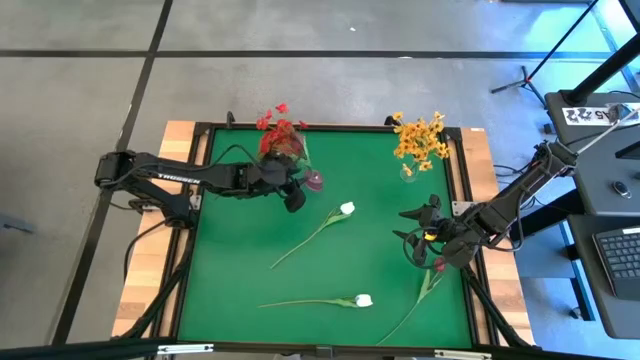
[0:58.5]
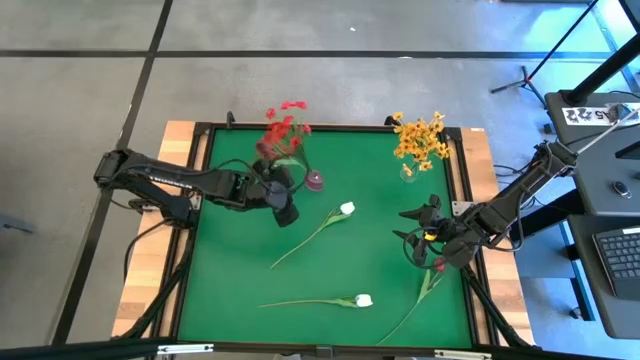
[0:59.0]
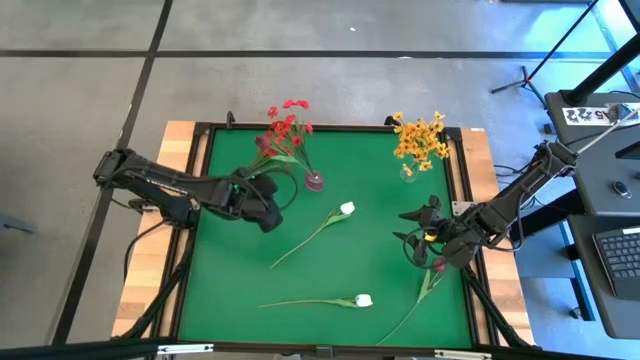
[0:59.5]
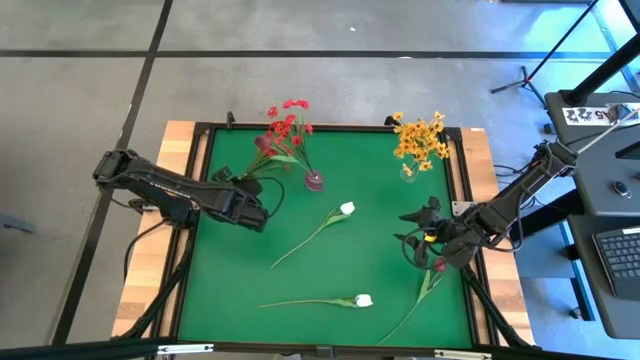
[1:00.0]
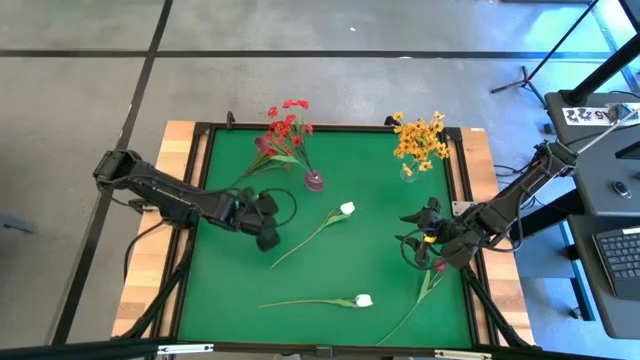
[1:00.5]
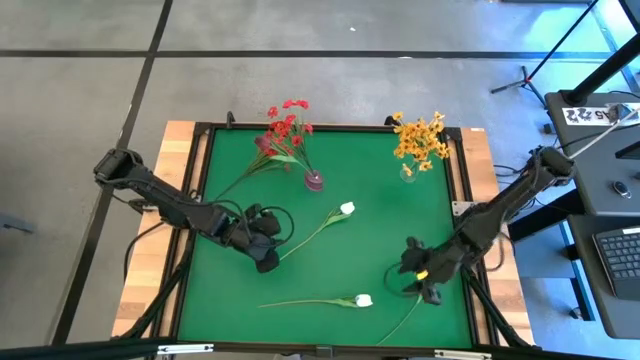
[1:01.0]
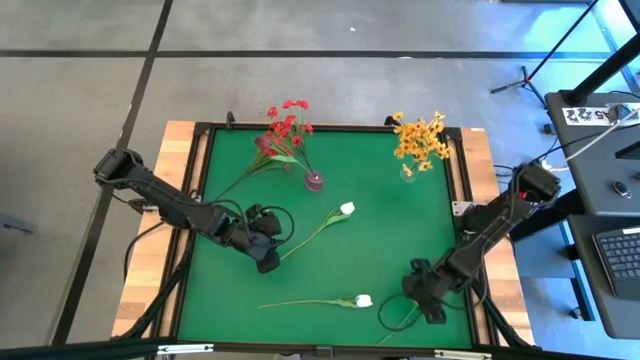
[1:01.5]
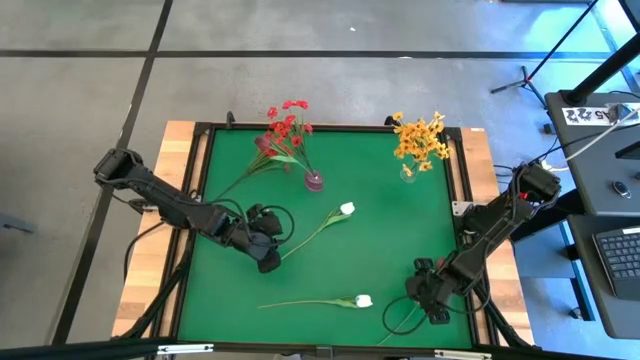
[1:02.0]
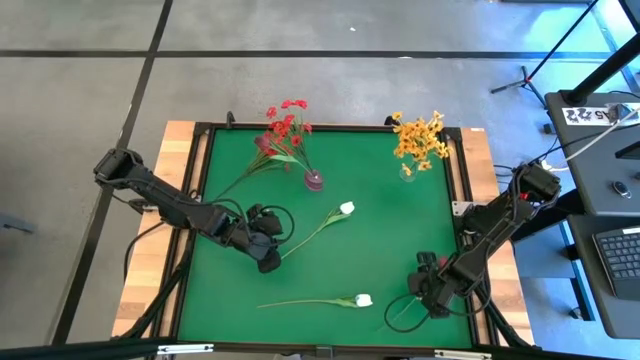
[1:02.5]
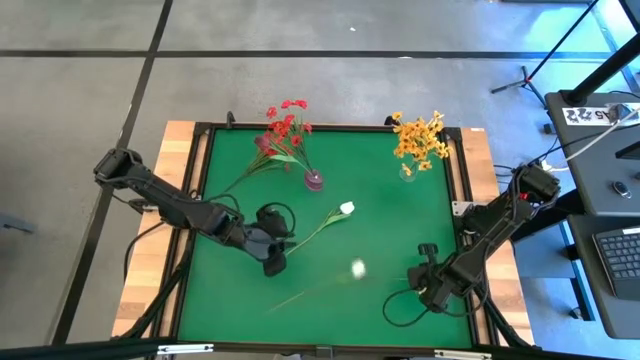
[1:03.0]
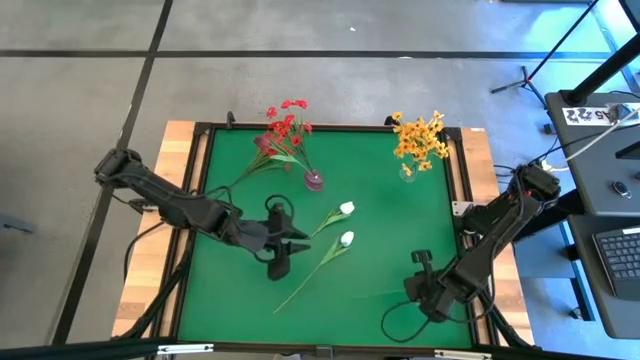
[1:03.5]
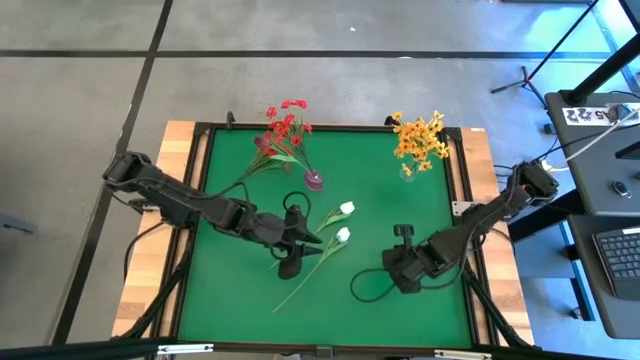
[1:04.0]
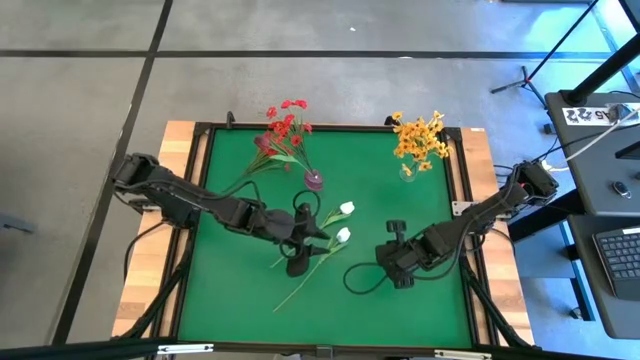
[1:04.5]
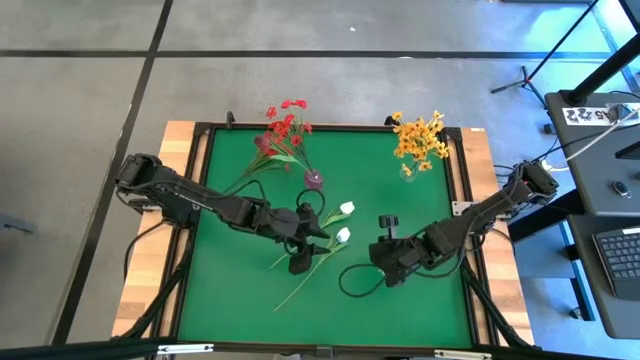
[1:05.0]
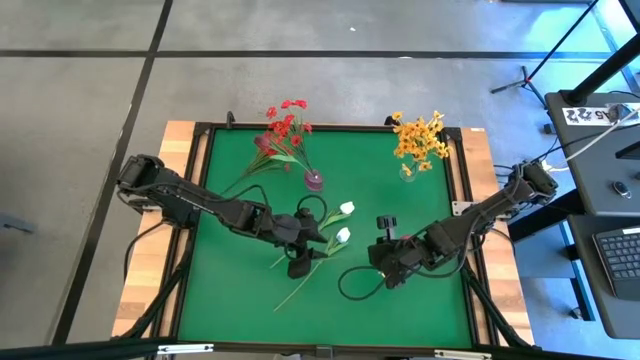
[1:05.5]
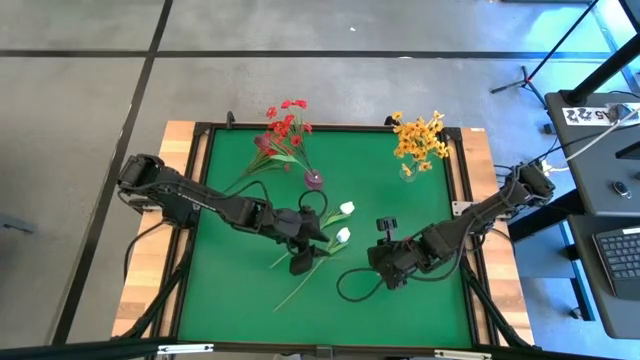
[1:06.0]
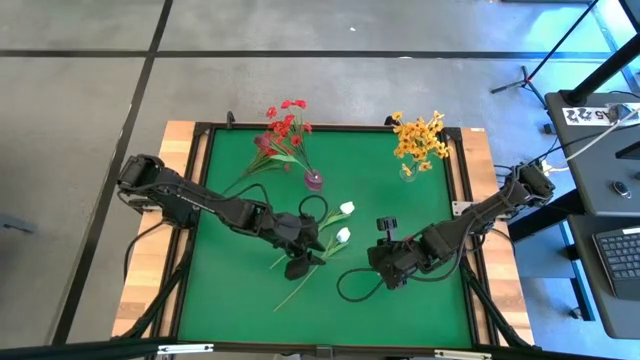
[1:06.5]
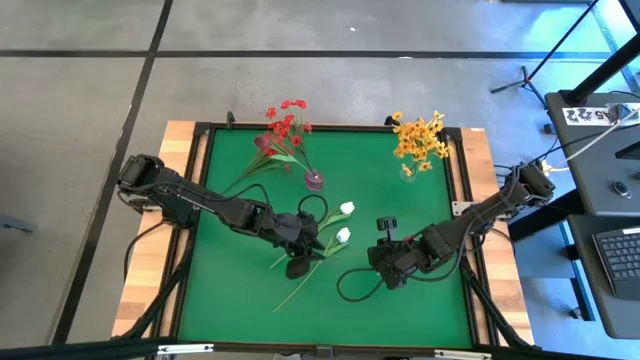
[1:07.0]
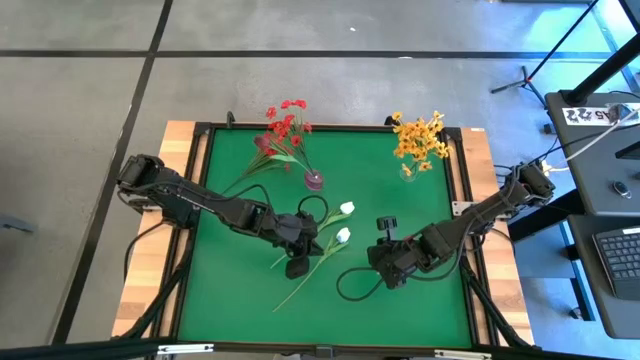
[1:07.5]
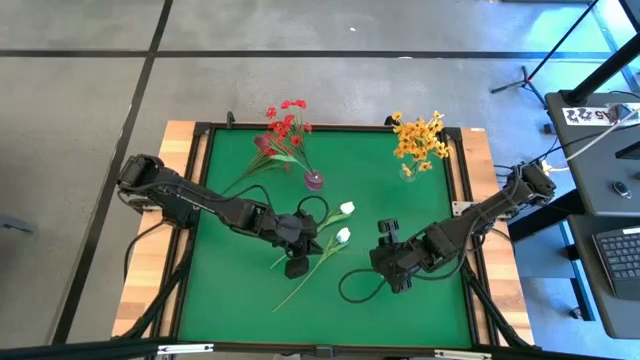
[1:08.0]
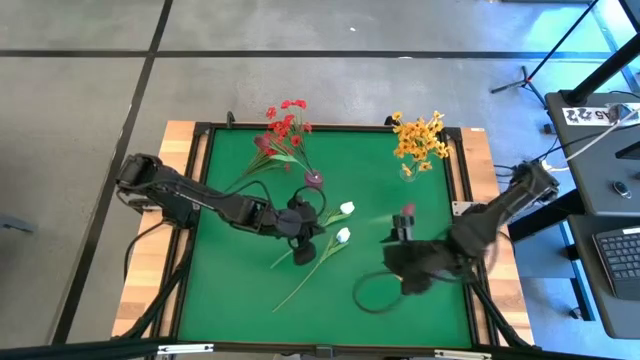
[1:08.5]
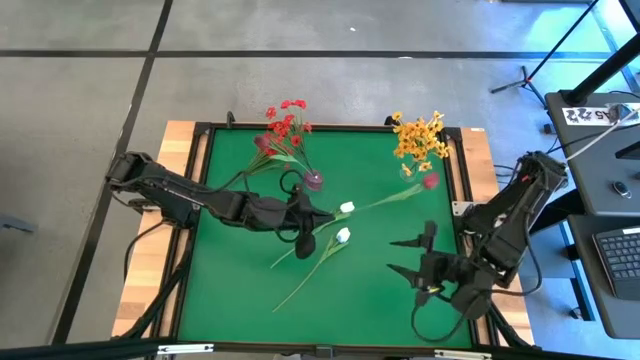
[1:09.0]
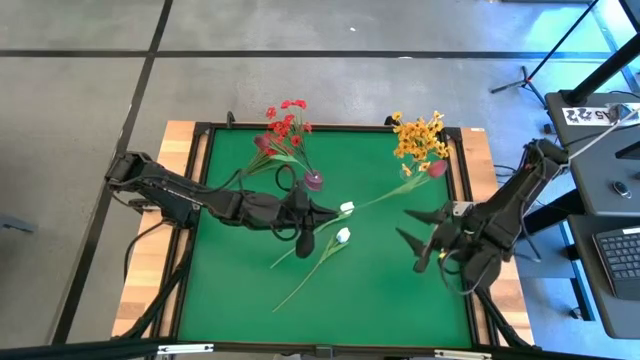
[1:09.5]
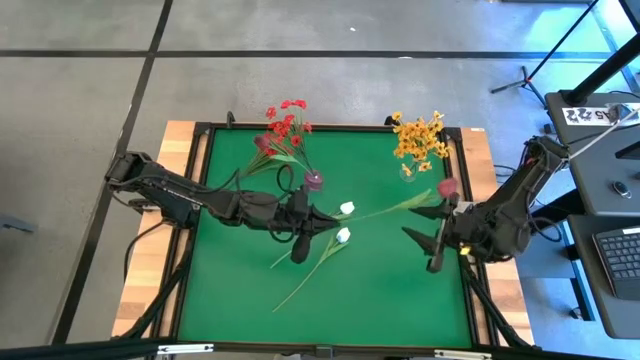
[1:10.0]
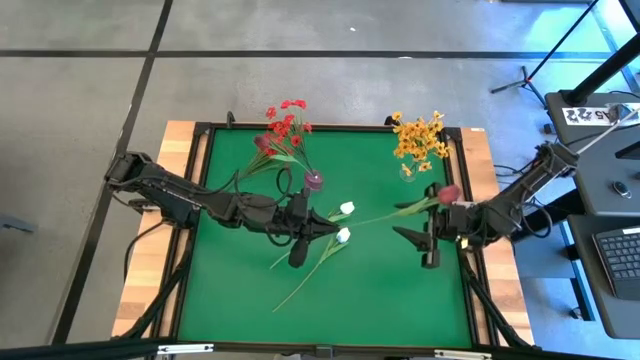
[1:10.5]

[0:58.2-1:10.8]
Task: Sort flowers into vase by color
Put the red tulip into the pink vase

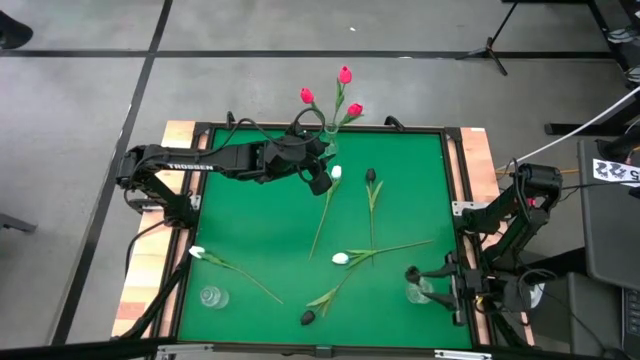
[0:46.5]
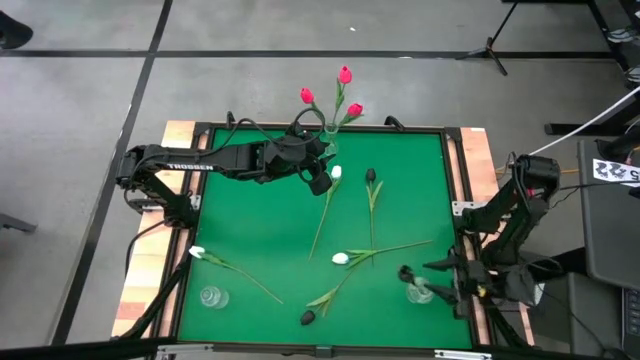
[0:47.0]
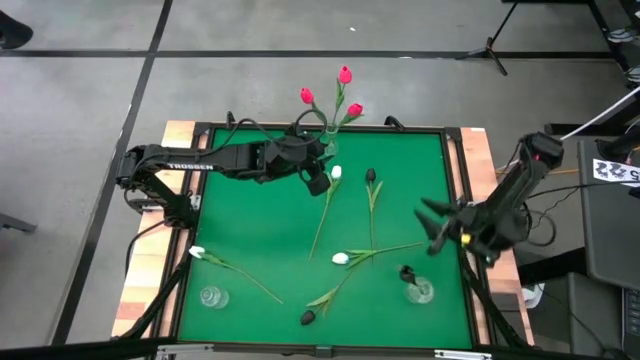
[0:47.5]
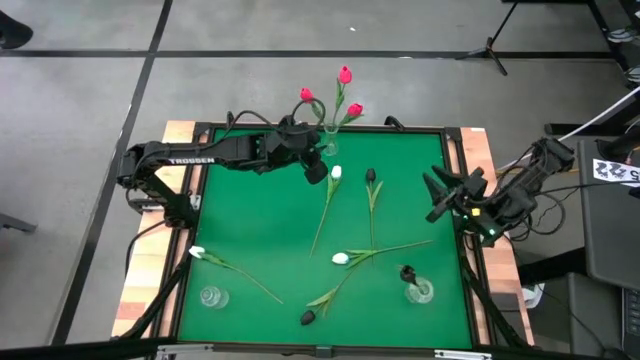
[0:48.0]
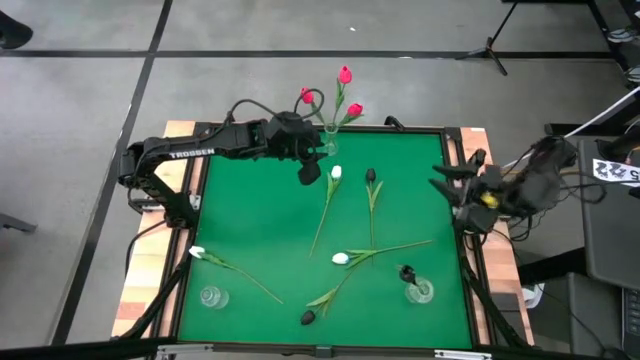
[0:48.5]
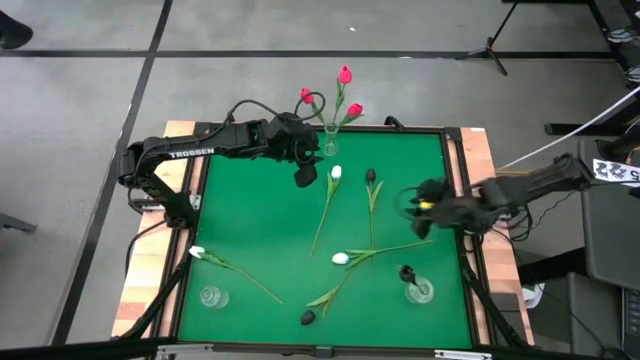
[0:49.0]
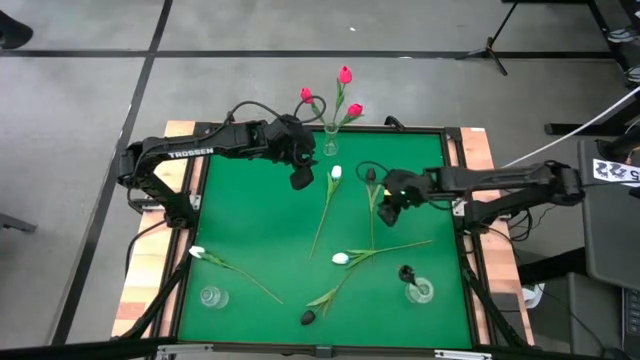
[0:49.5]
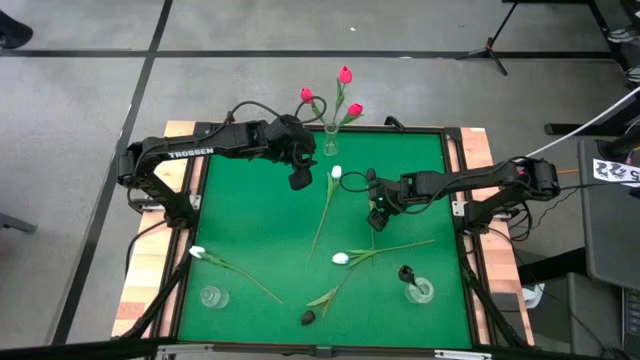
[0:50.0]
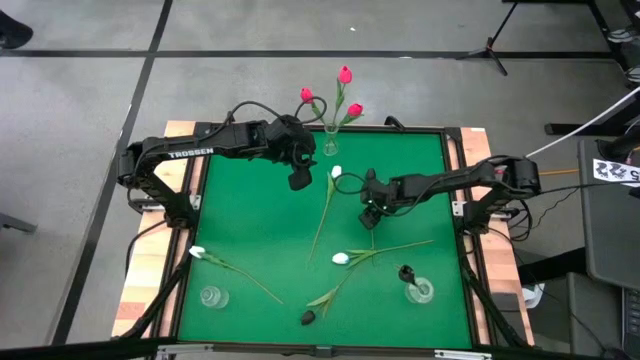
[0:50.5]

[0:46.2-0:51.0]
Task: Sort flowers into vase by color
Put the top black tulip into the bottom right transparent vase

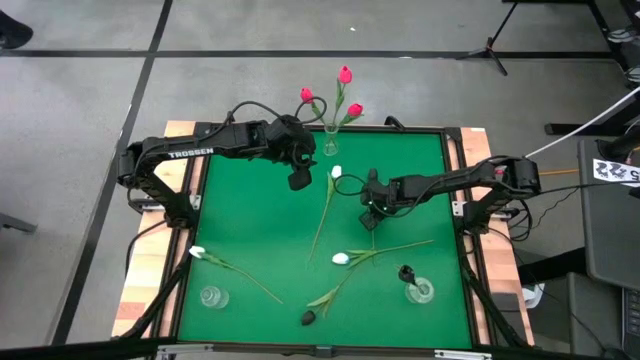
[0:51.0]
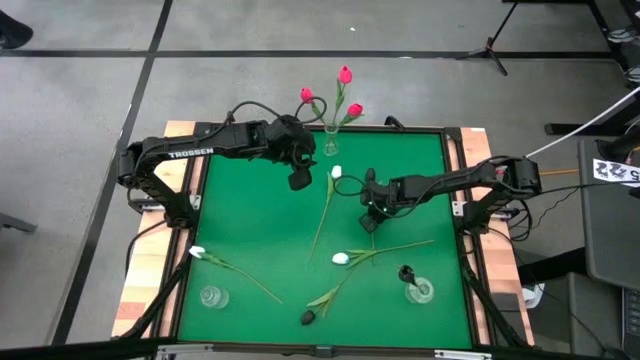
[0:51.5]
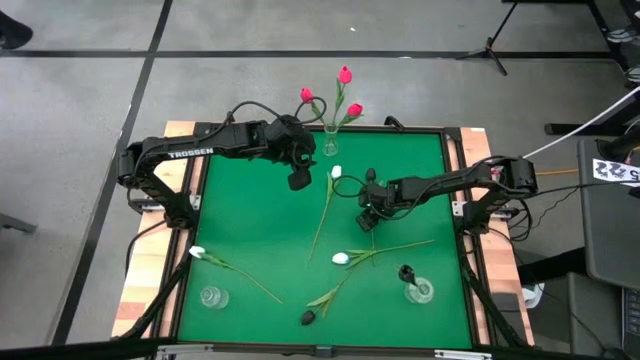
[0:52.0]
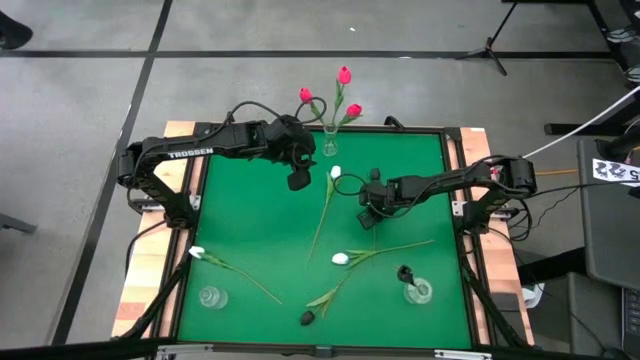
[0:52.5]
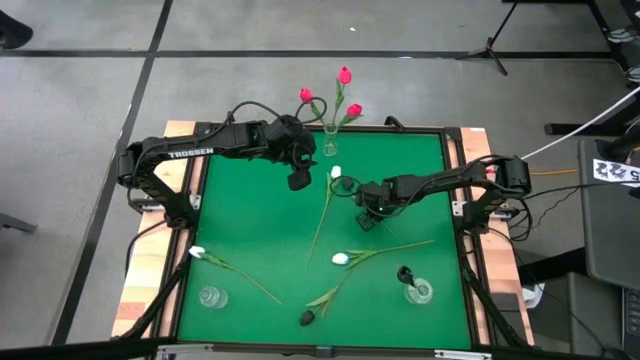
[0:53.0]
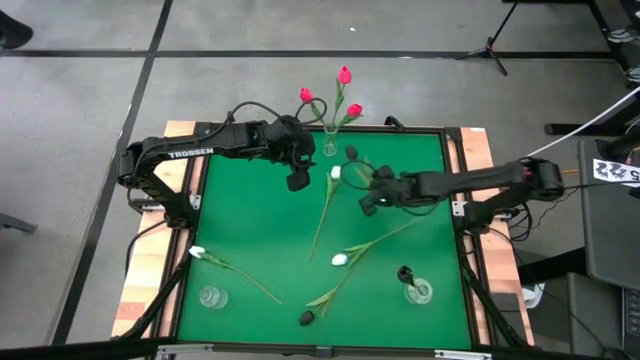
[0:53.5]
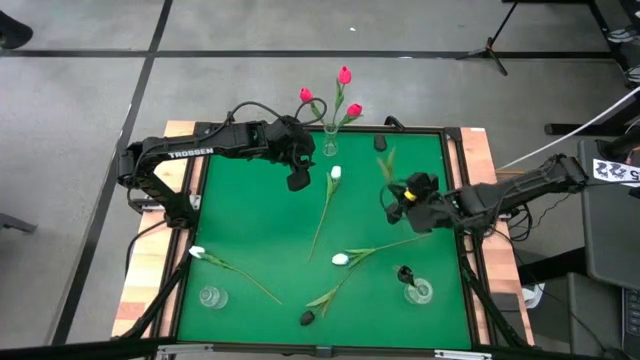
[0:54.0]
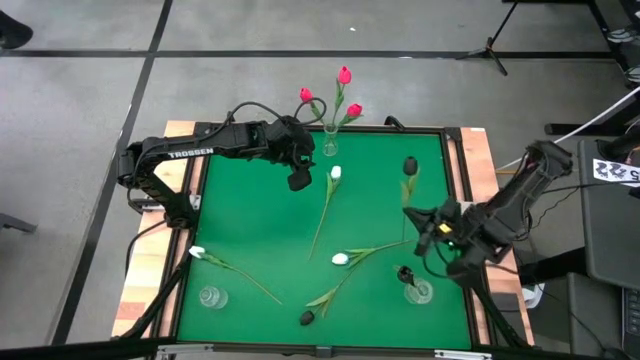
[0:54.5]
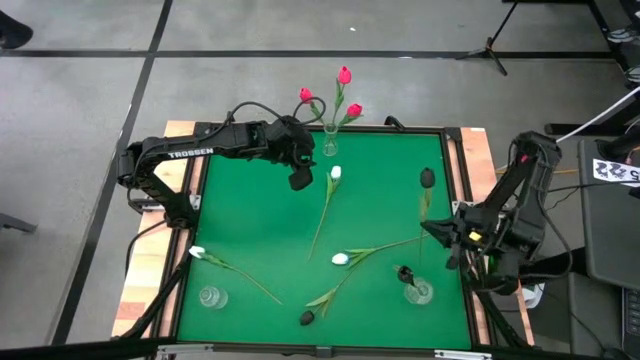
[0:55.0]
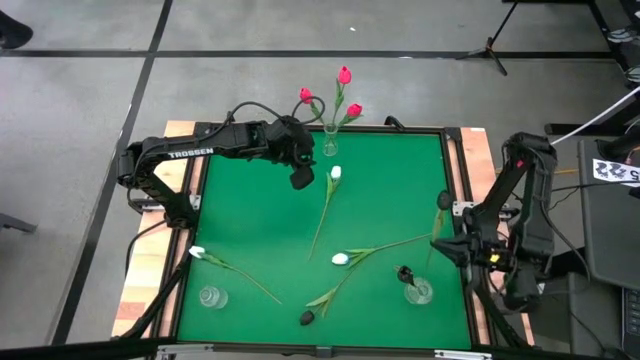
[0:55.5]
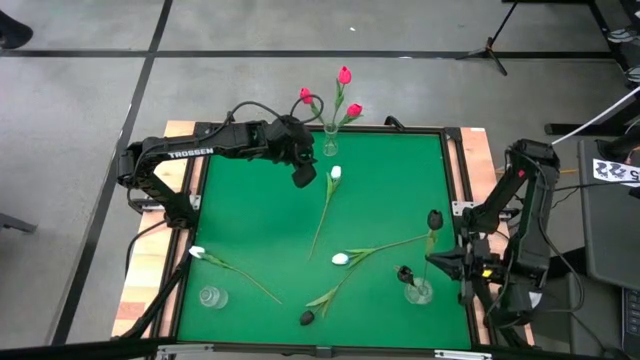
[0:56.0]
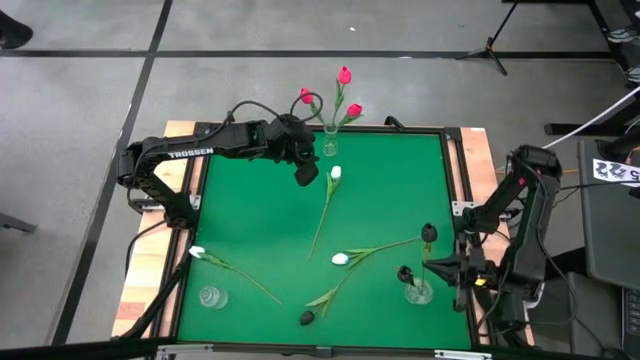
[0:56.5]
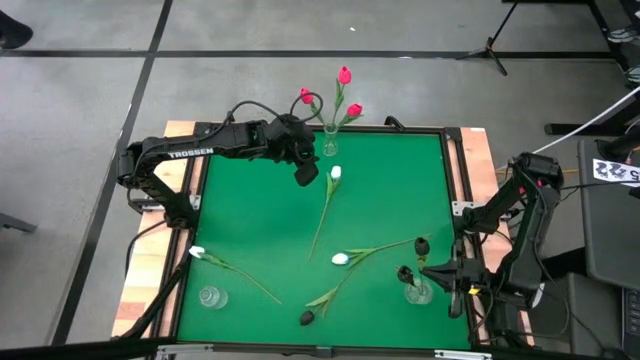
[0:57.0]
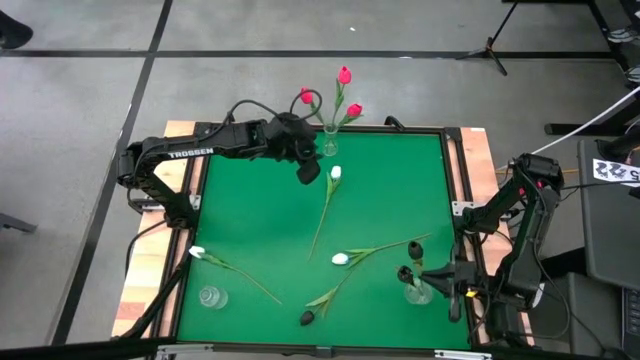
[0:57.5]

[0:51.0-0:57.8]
Put the top black tulip into the bottom right transparent vase
